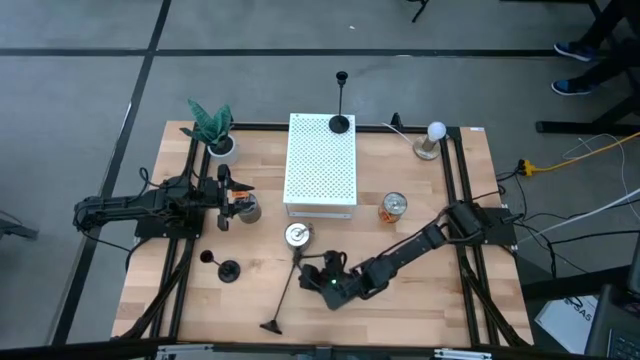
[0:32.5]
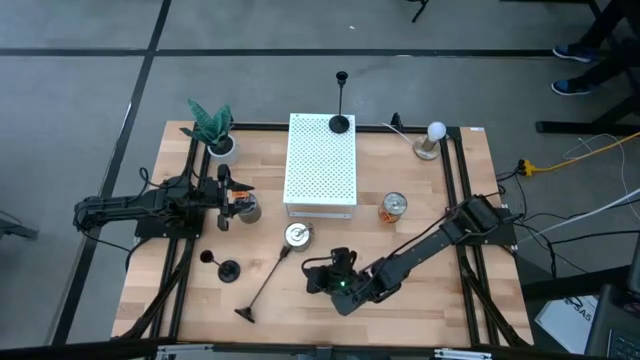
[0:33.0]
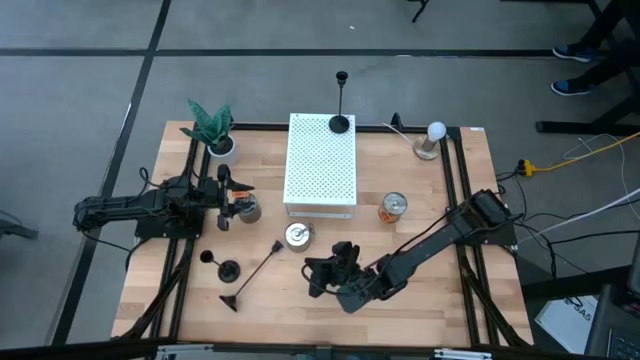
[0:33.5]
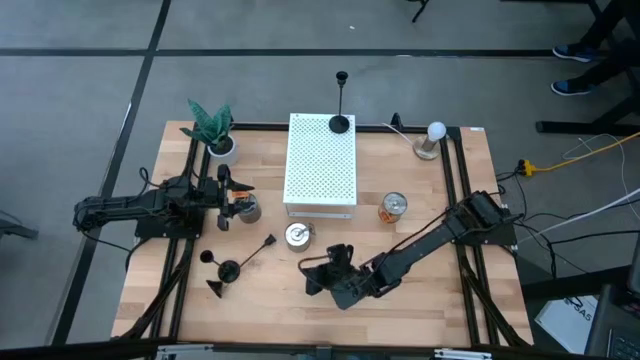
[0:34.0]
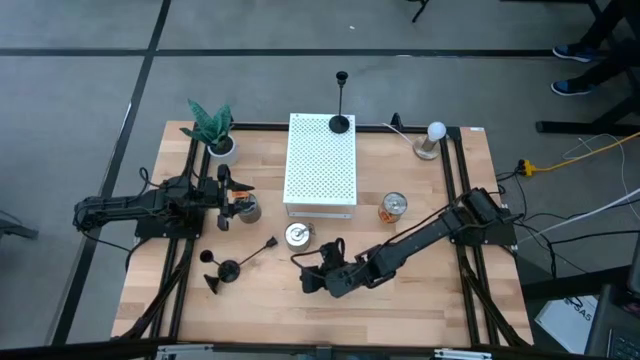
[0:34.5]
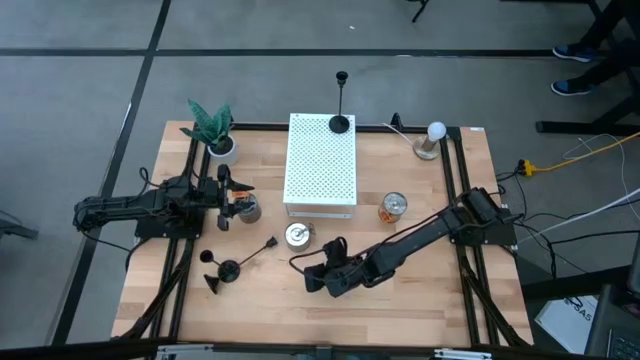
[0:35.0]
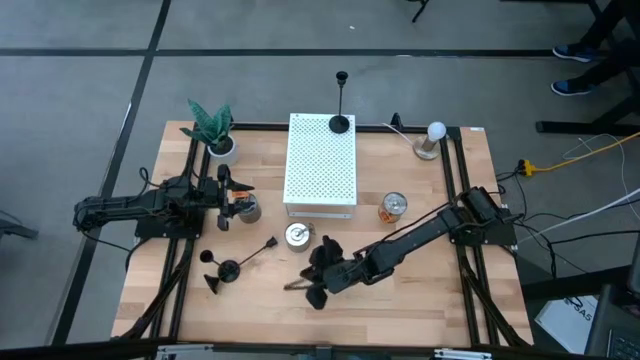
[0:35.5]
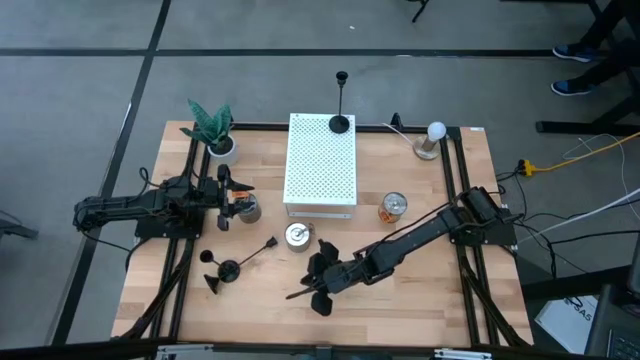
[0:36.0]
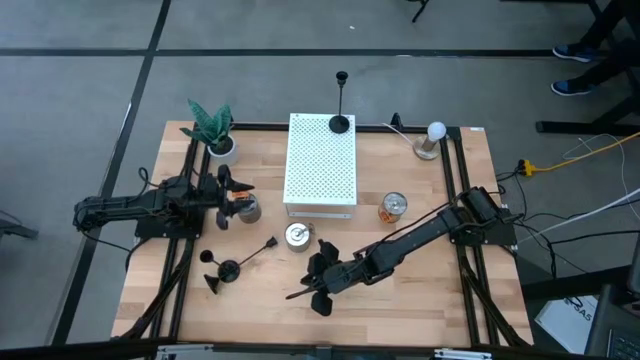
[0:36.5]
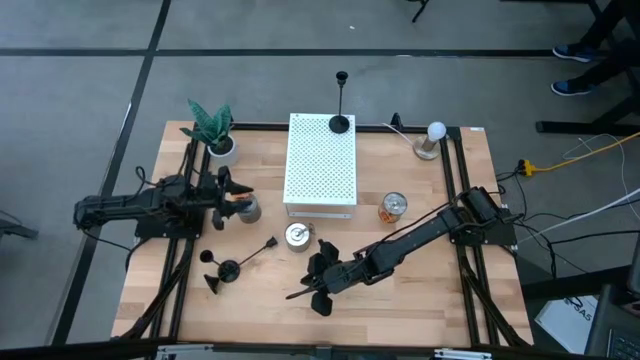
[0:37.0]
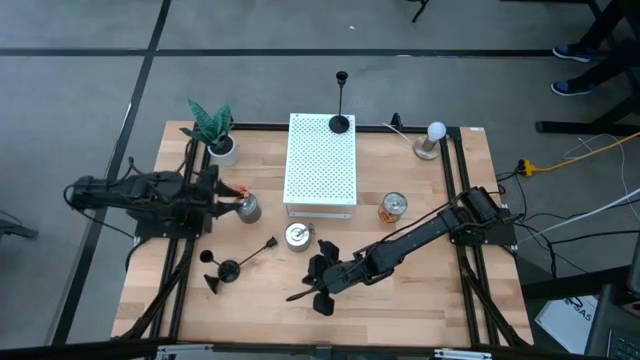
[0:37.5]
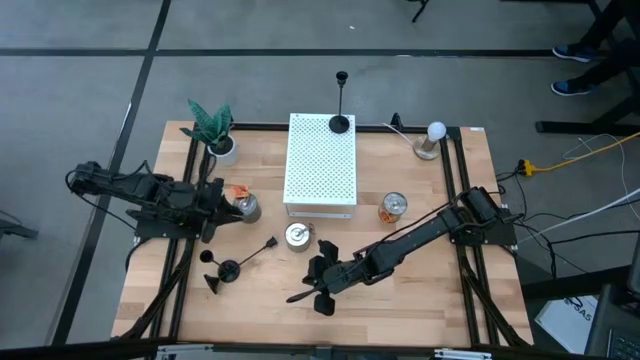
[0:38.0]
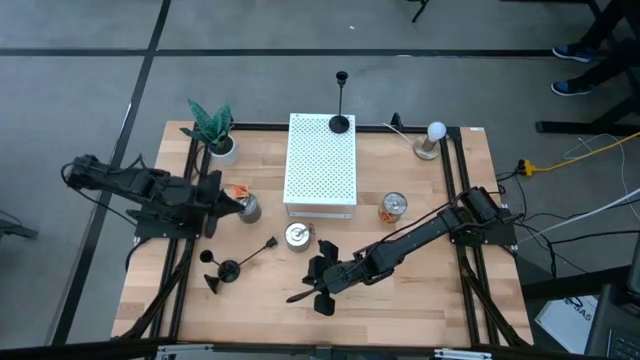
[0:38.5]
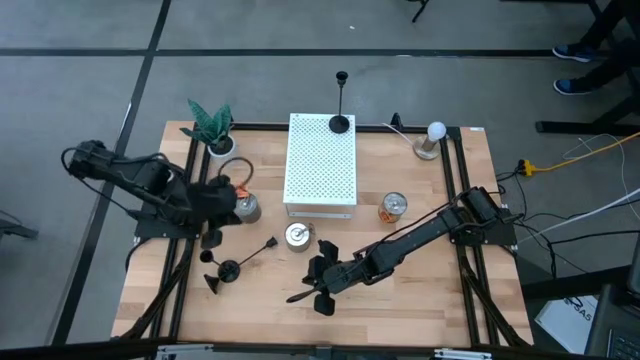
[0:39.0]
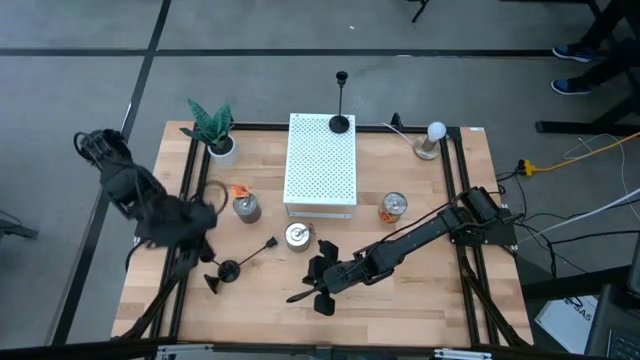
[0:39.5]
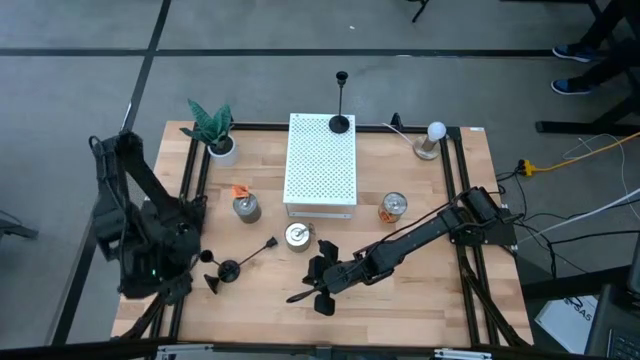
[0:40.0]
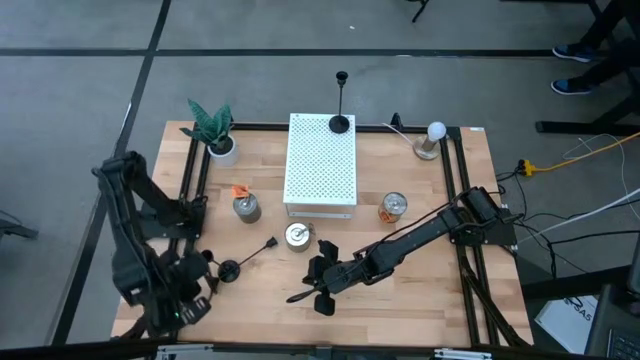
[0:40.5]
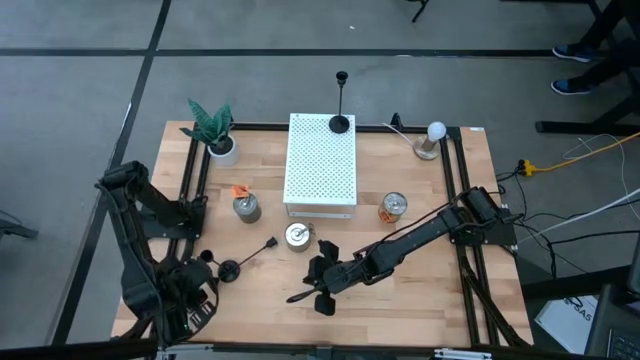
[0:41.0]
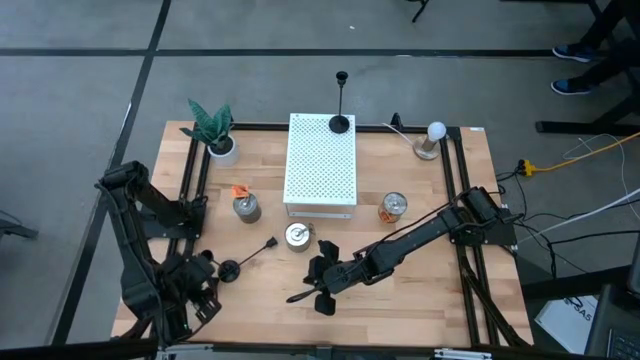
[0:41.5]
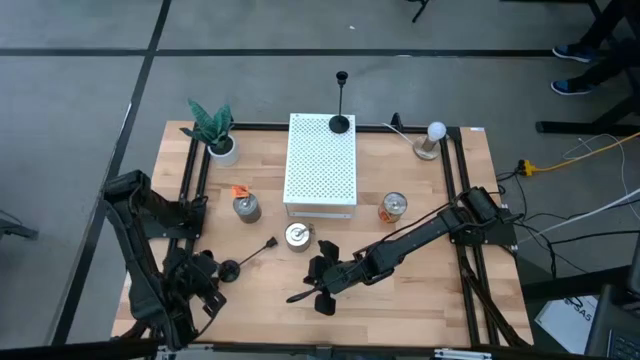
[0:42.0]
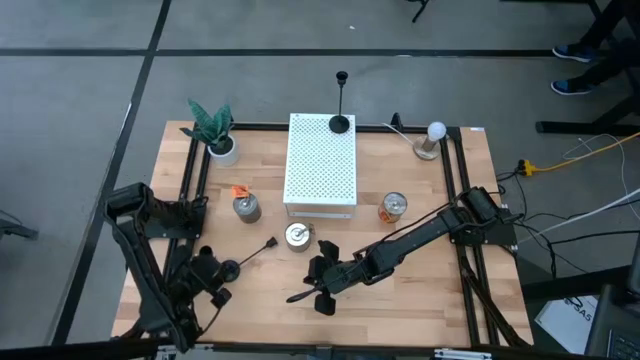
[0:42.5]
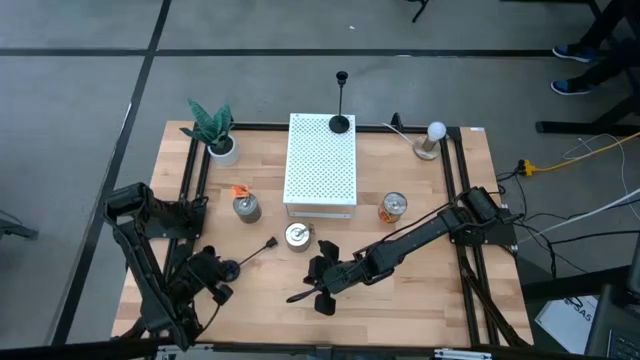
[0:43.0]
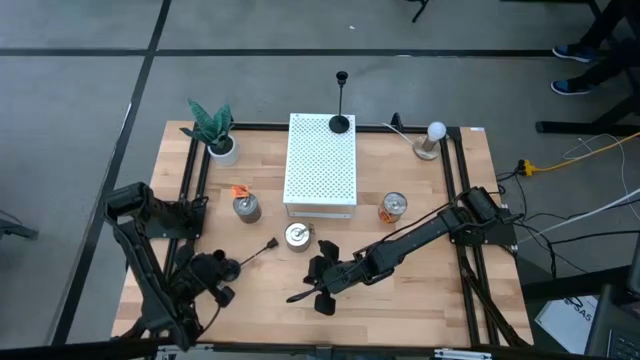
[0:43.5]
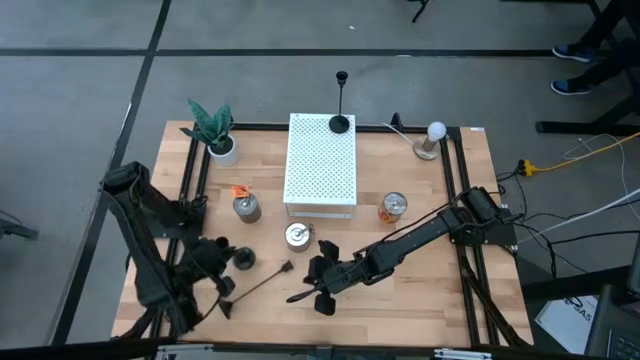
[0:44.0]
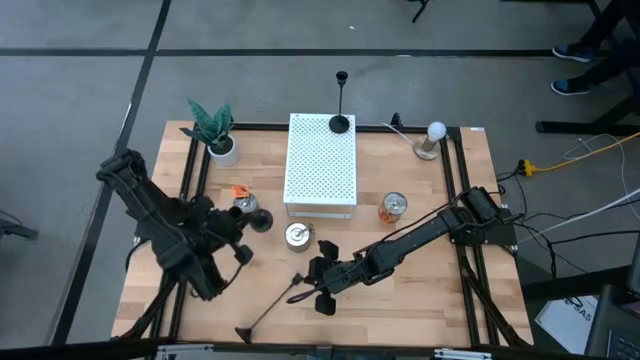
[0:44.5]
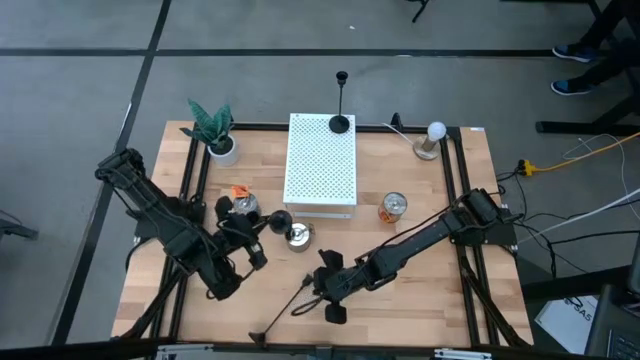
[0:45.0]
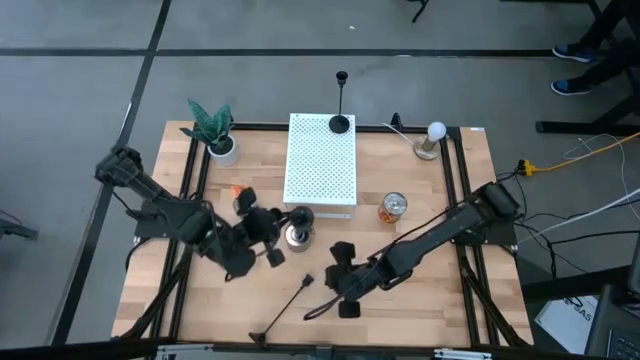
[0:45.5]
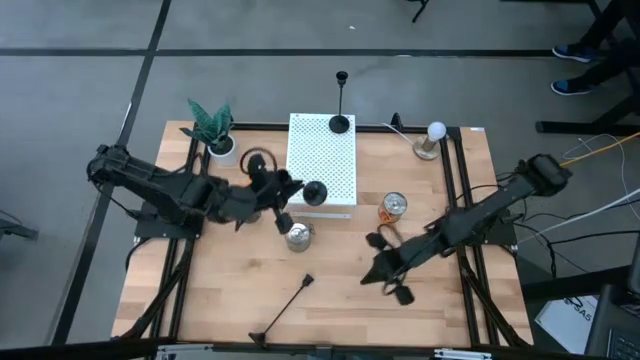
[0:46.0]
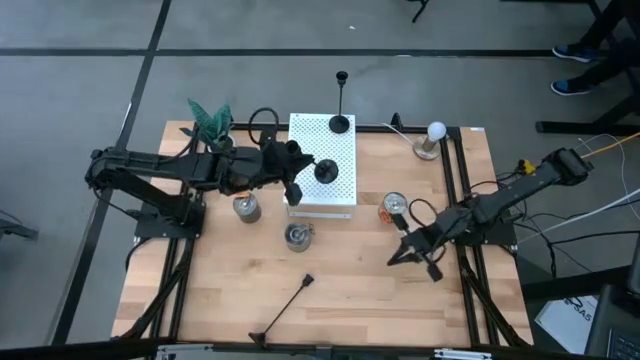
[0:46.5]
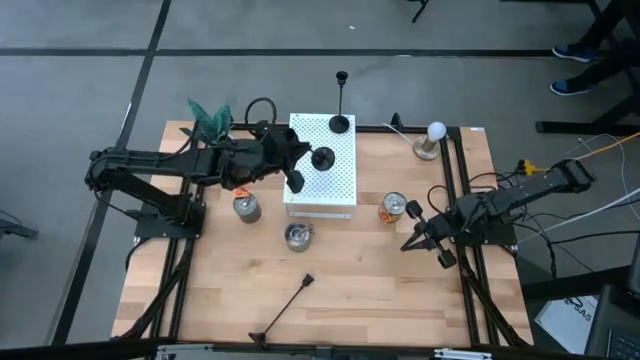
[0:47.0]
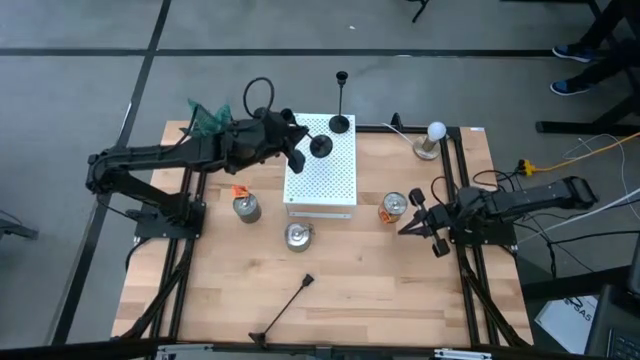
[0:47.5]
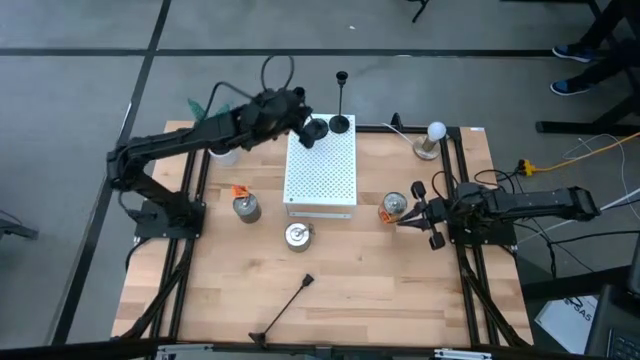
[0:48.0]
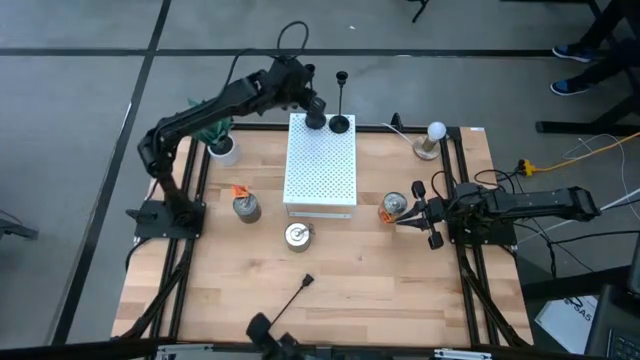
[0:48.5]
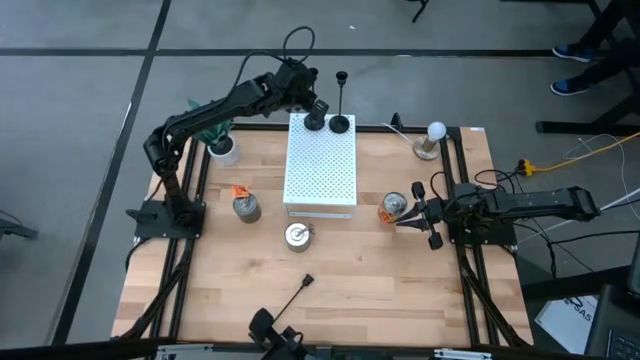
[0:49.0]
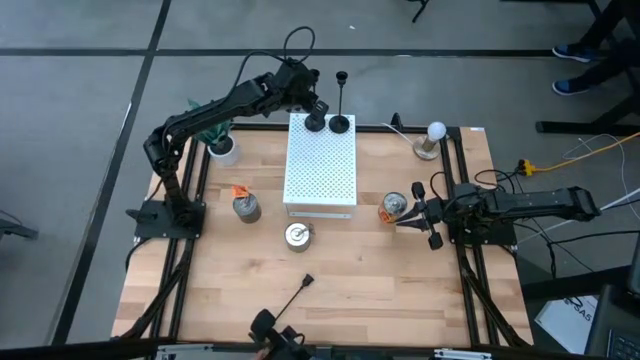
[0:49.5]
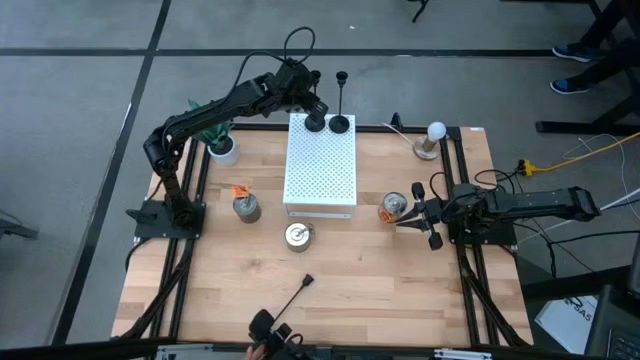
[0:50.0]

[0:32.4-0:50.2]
Task: Pick & Place candle stick holders
Put the top black candle holder on the shelf

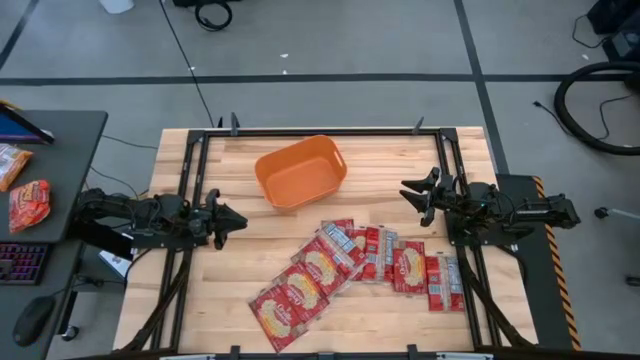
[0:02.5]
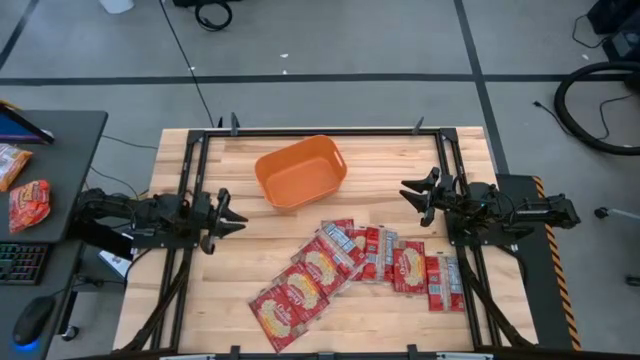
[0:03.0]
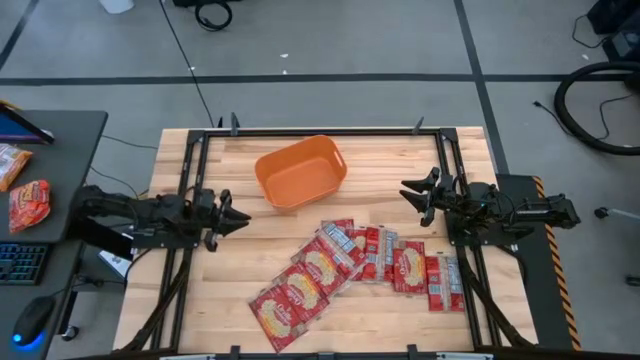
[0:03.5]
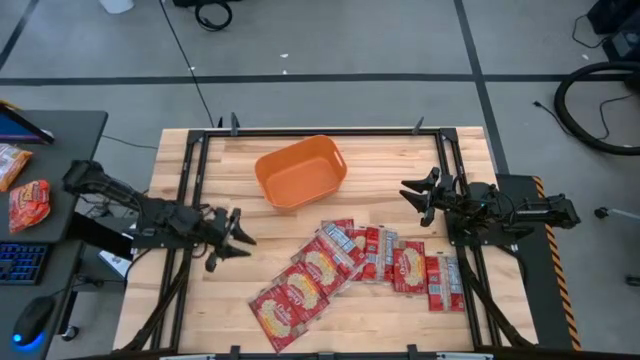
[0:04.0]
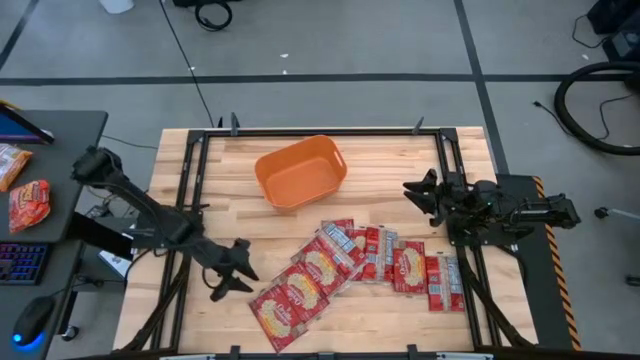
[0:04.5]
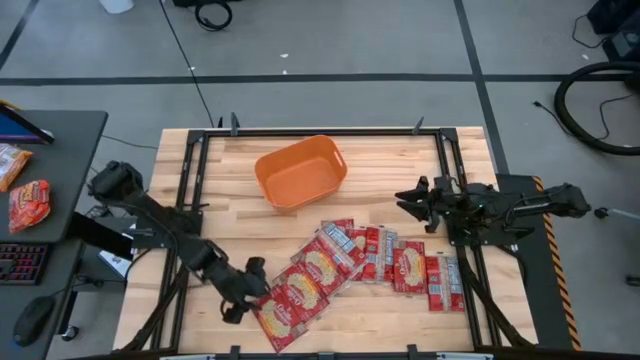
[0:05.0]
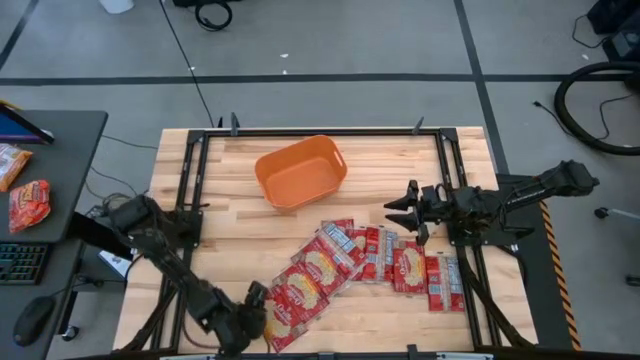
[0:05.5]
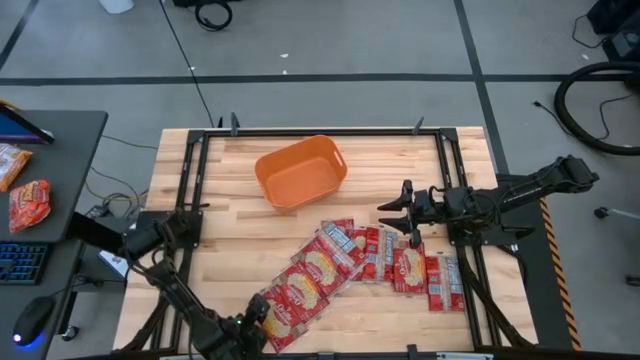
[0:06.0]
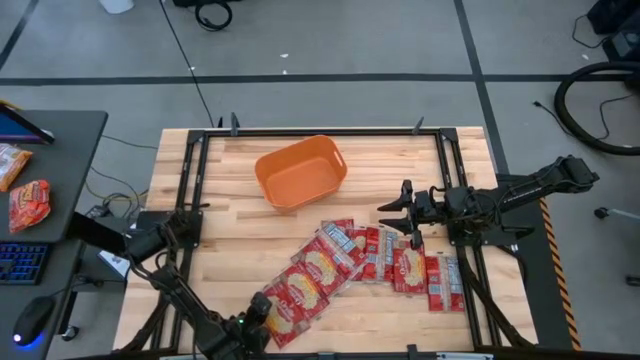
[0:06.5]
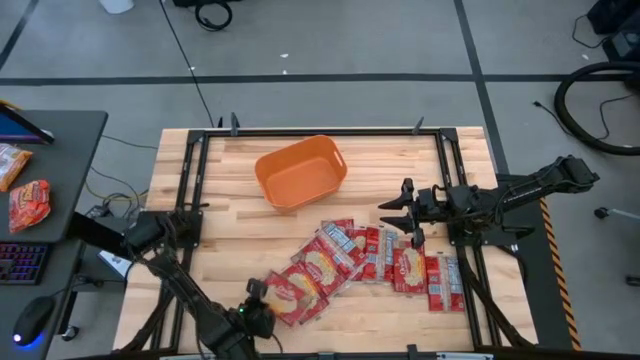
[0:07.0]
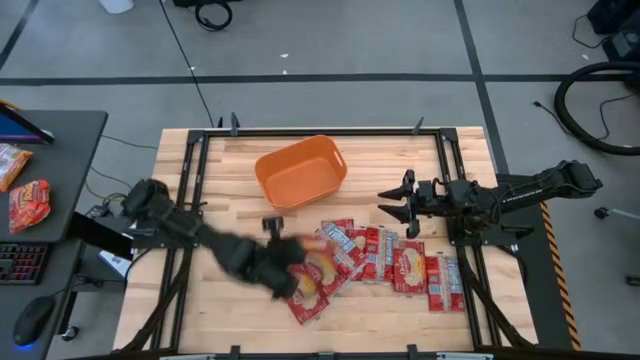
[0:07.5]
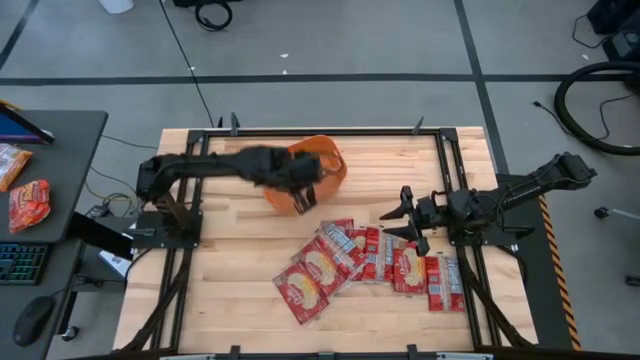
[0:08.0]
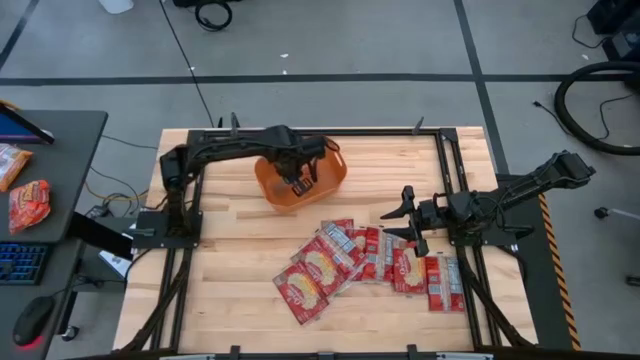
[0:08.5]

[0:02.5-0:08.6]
Task: Sort popcorn bags into baskets
Put the popcorn bag into the orange bin
